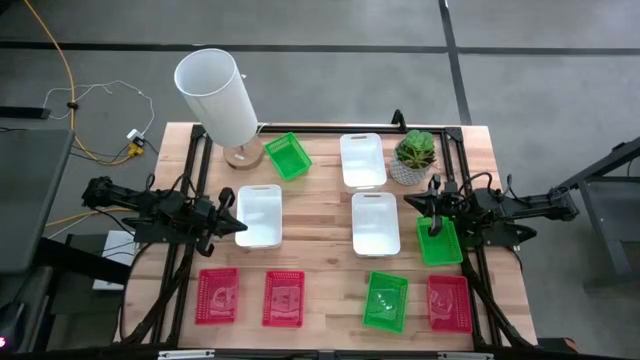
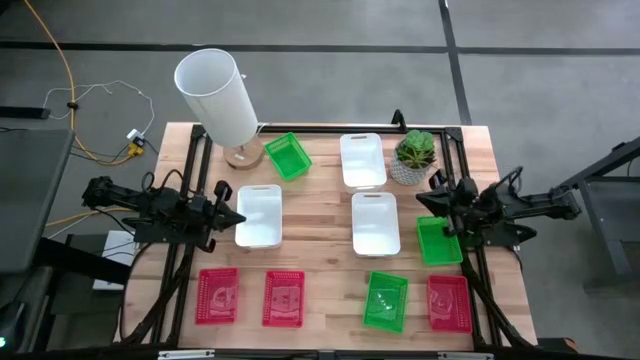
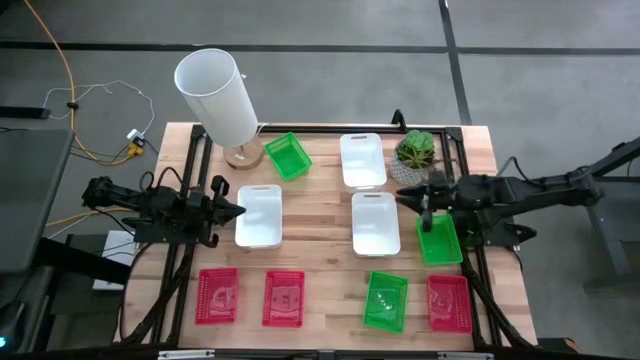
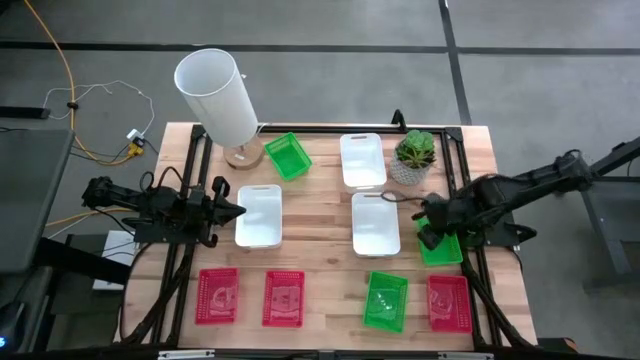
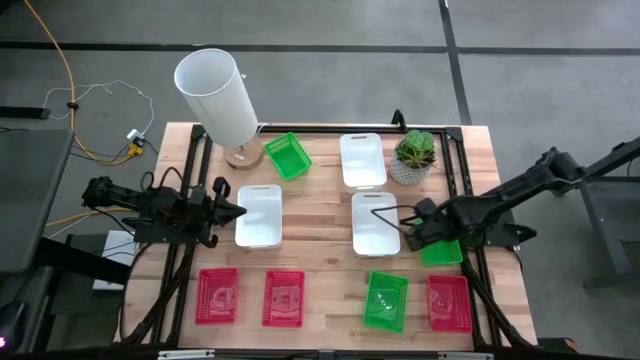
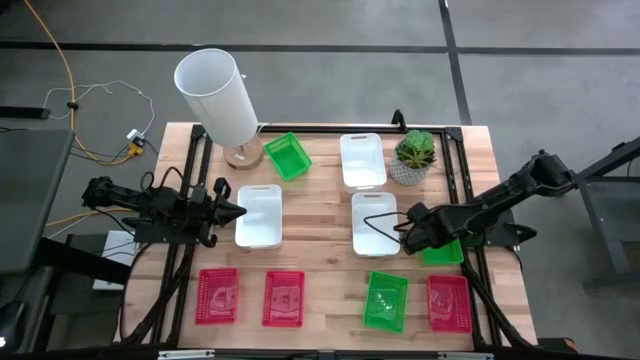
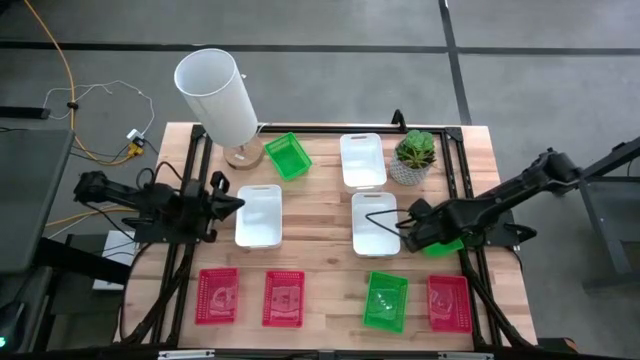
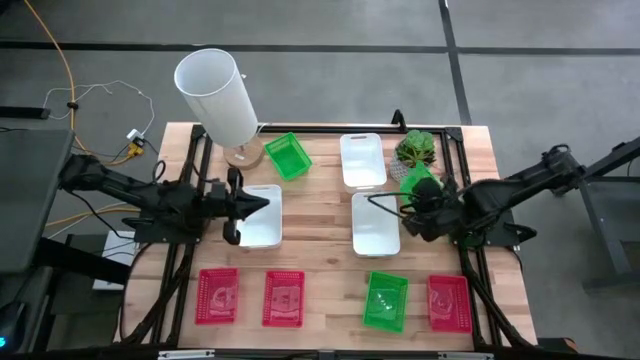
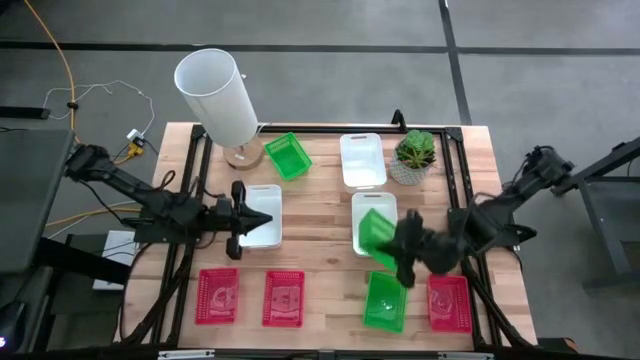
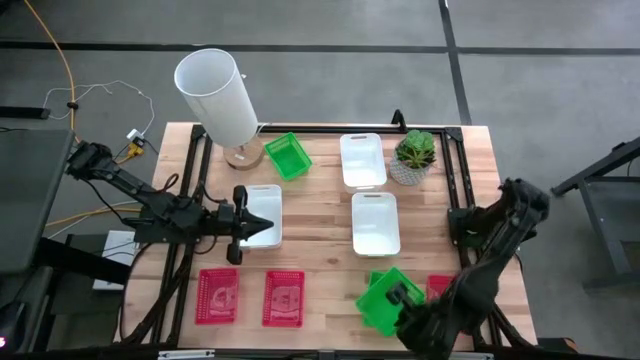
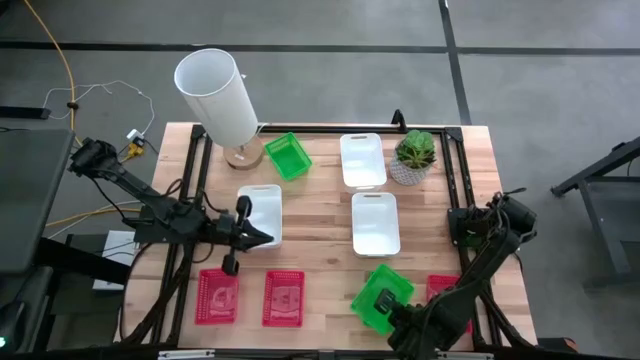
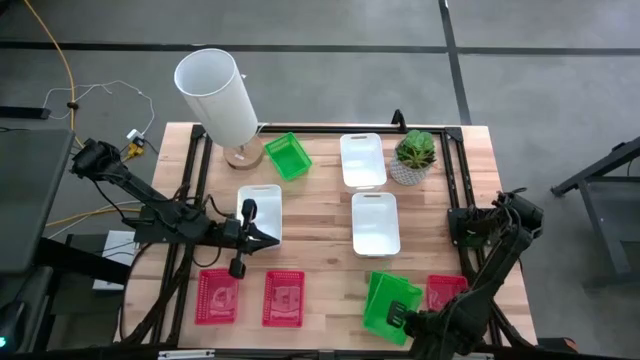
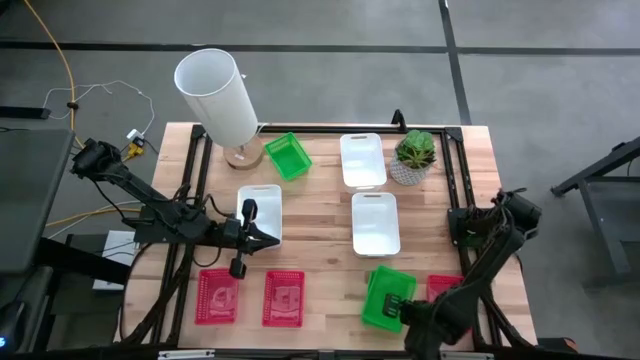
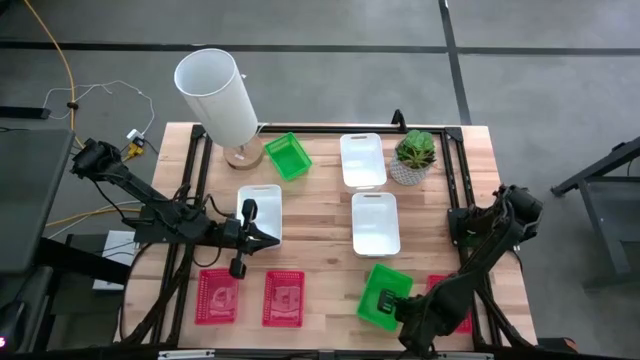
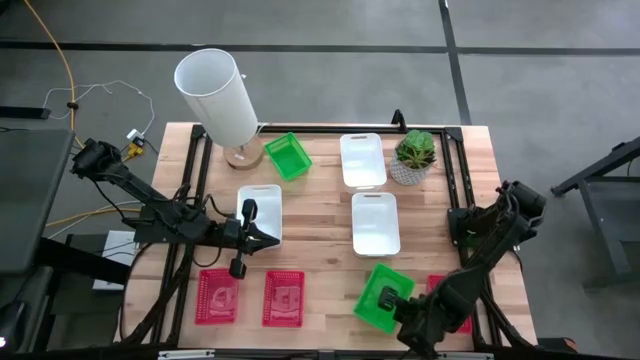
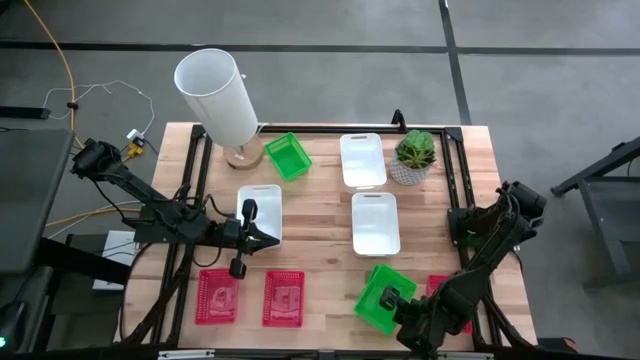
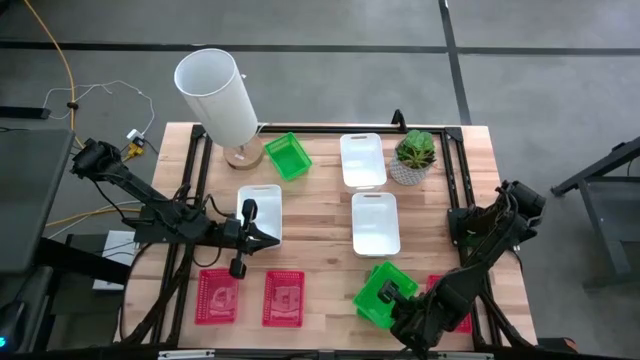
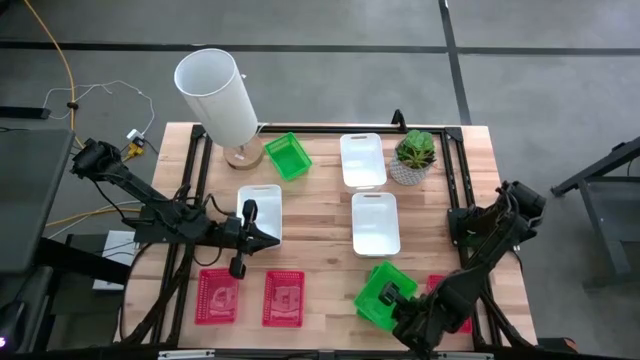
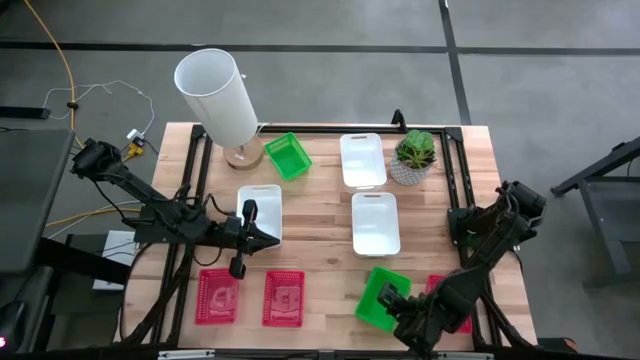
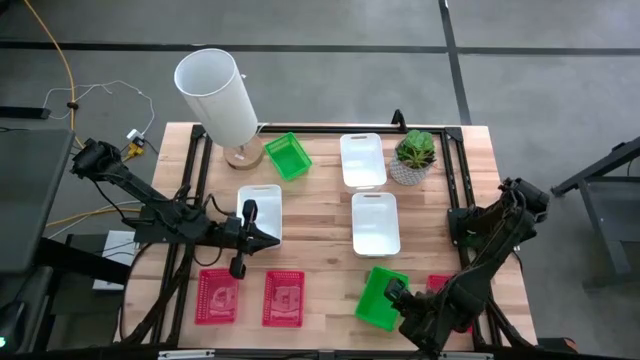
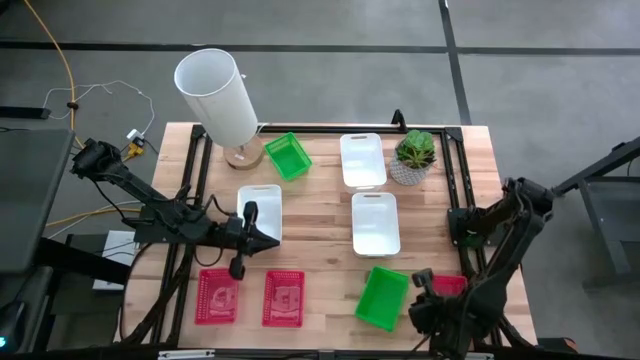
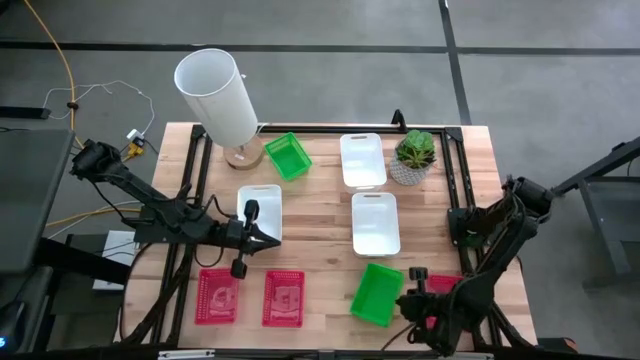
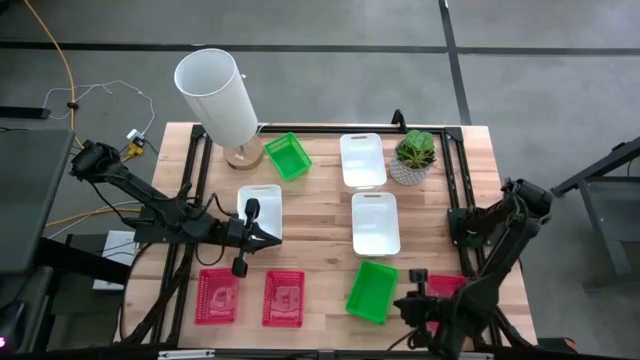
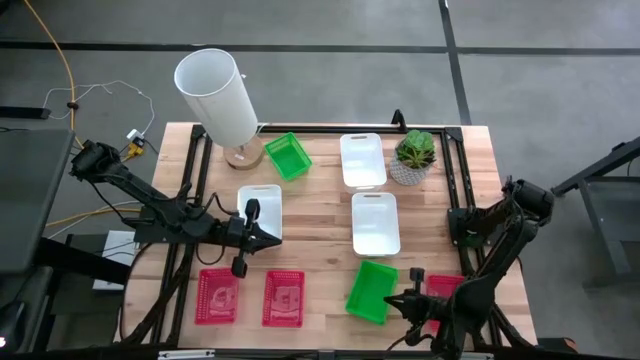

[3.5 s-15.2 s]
Stack the middle right green bin on the bottom green bin

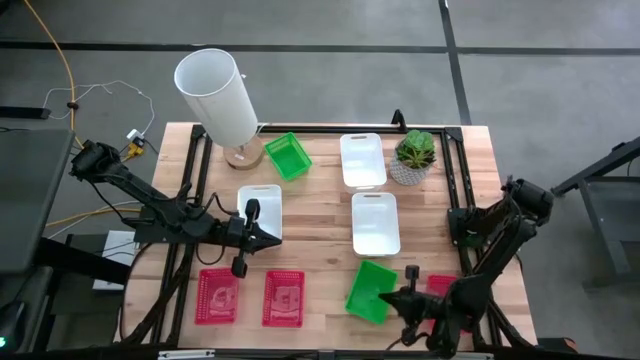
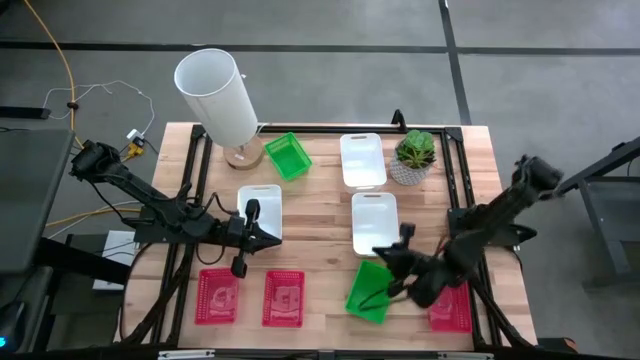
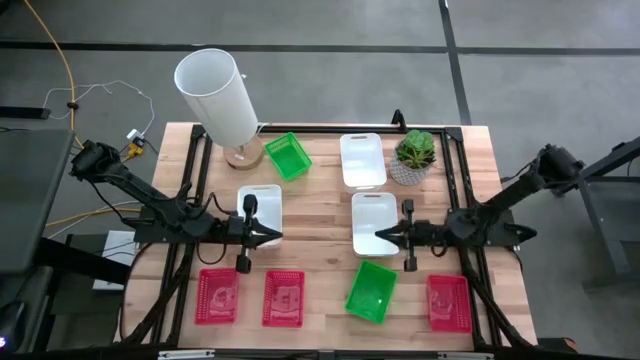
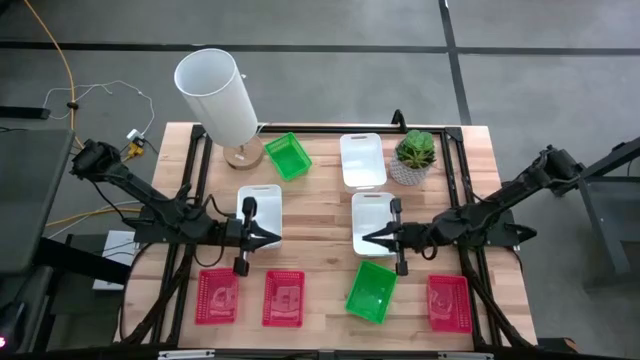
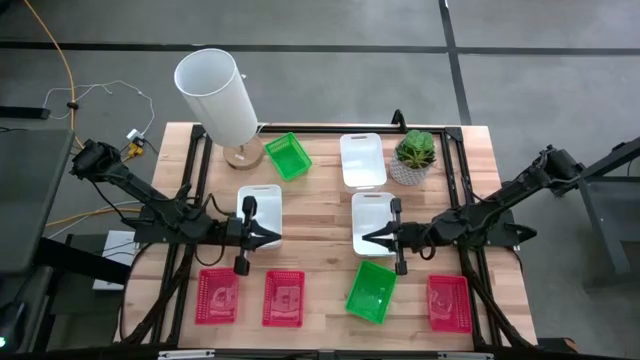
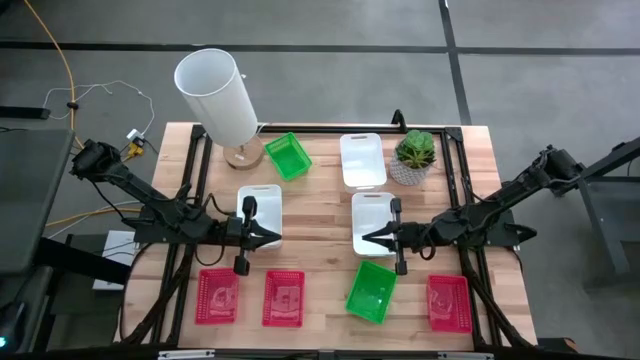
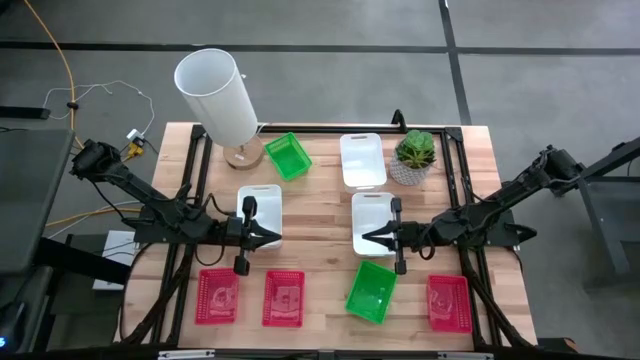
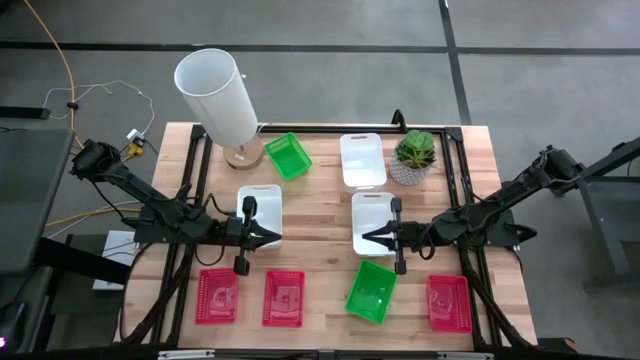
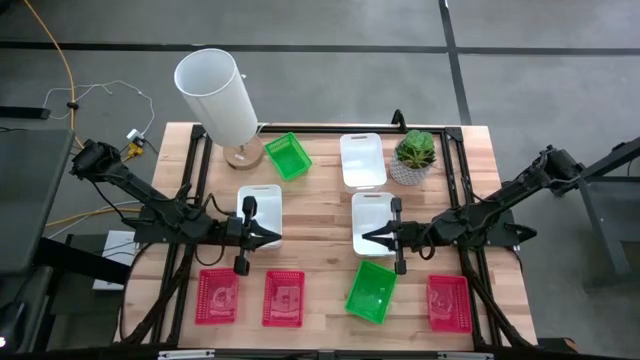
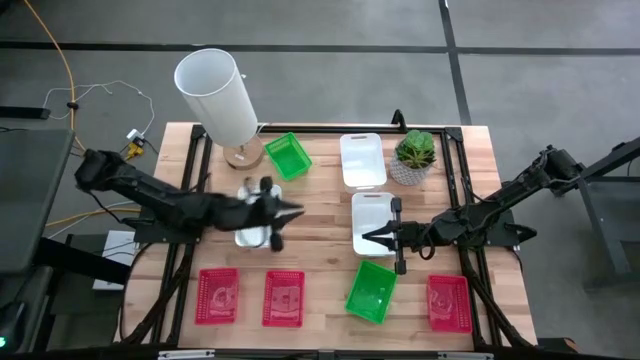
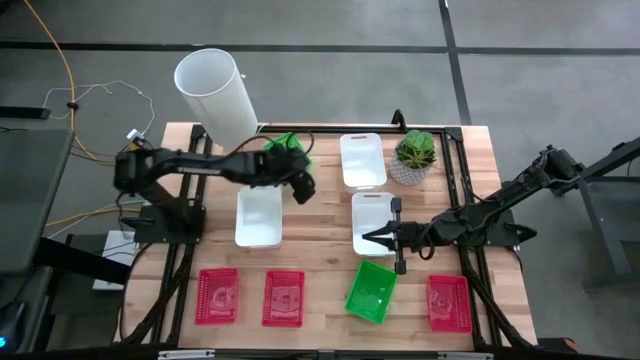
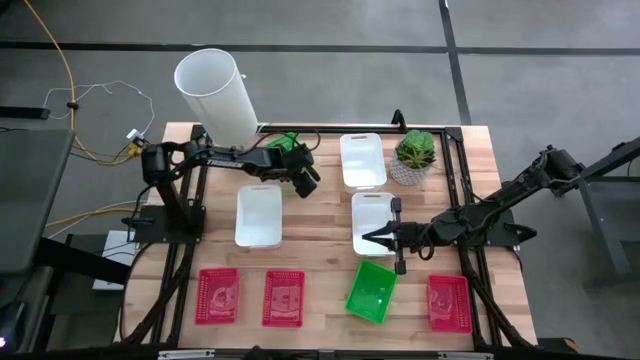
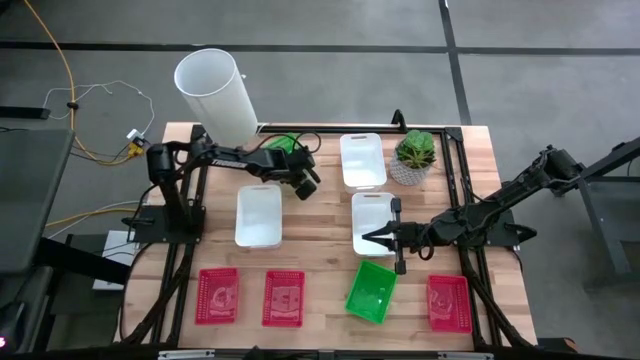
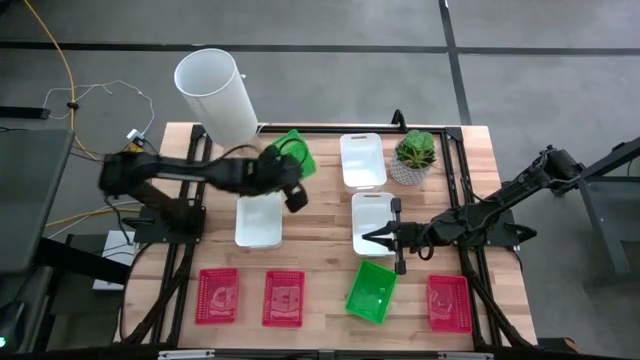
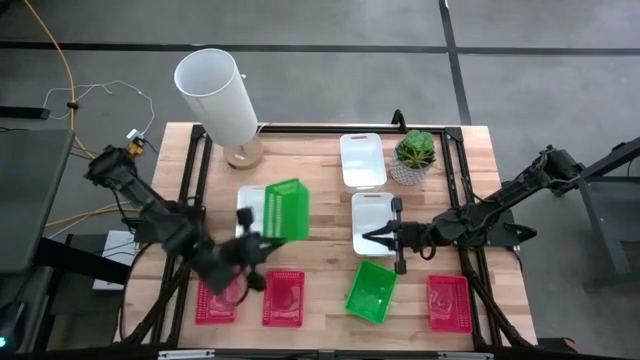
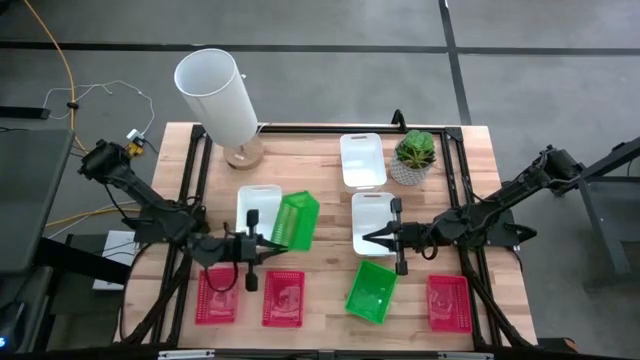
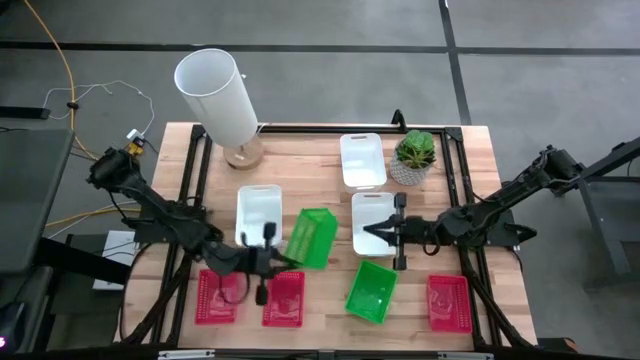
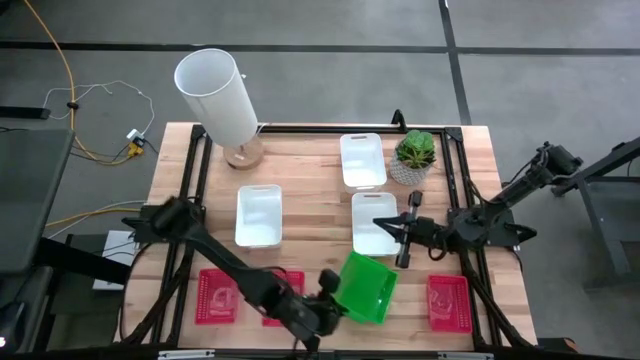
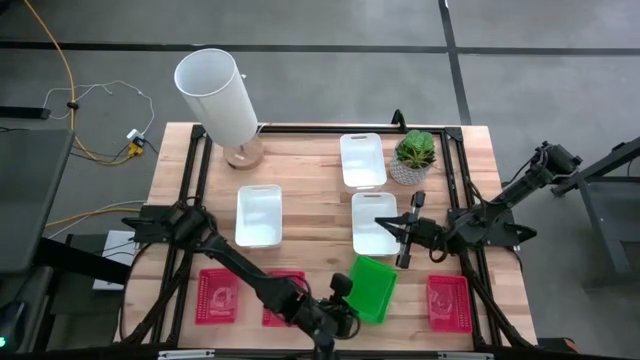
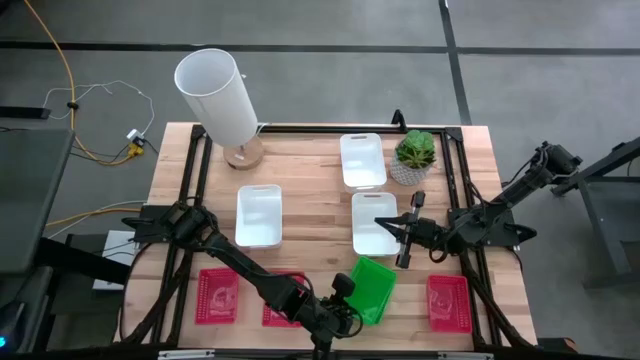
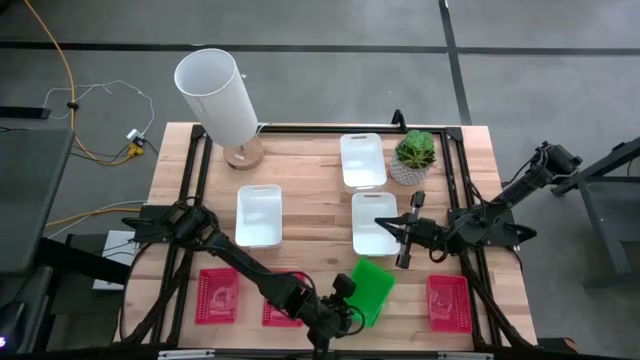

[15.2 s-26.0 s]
Stack the top green bin on the bottom green bin
